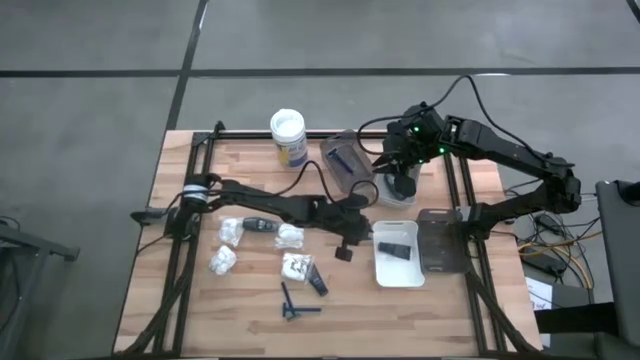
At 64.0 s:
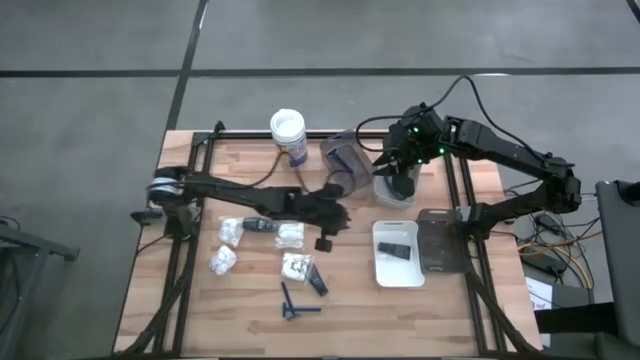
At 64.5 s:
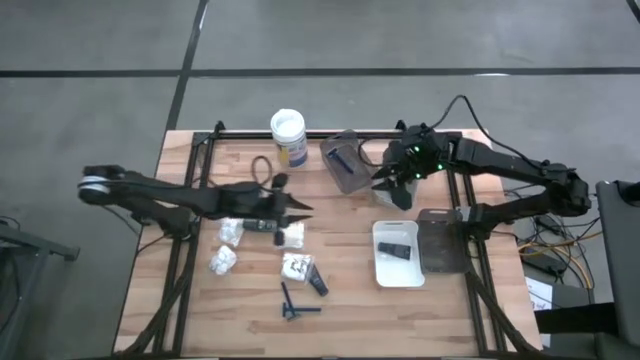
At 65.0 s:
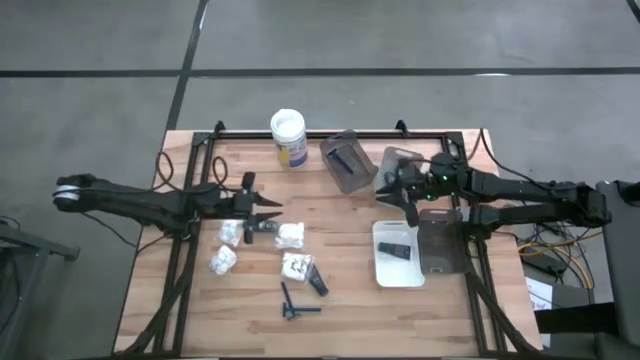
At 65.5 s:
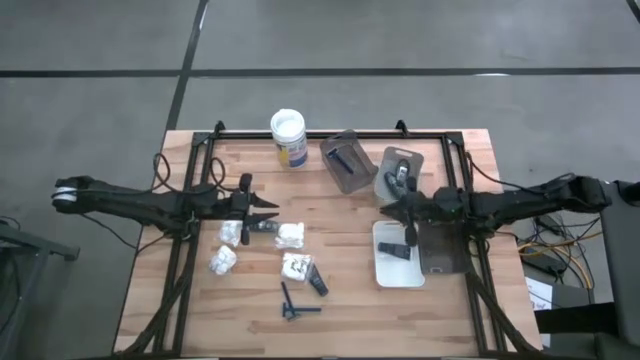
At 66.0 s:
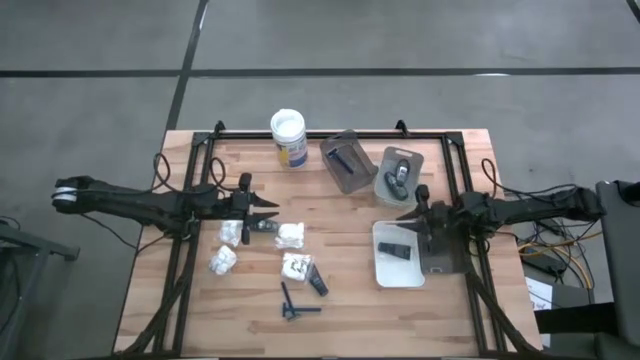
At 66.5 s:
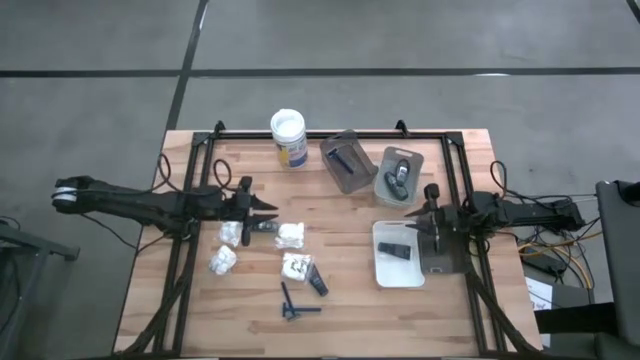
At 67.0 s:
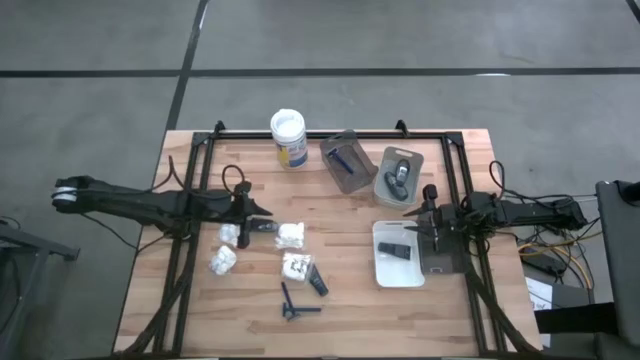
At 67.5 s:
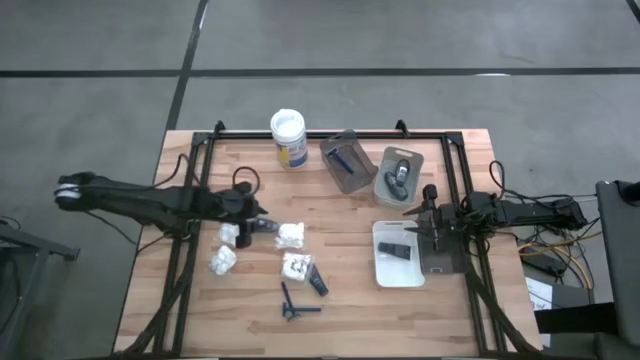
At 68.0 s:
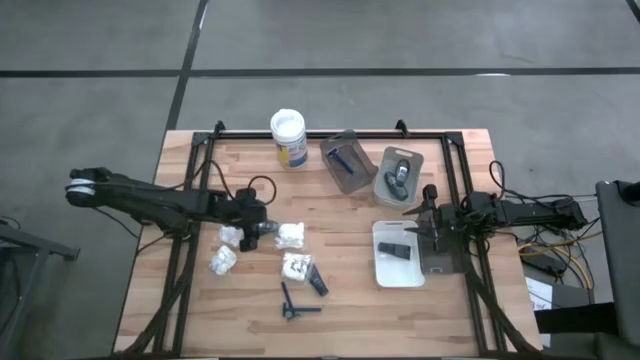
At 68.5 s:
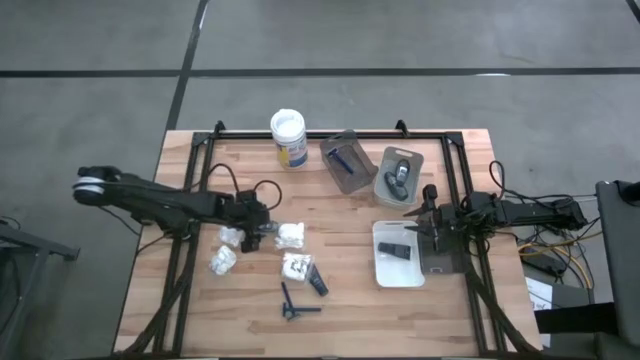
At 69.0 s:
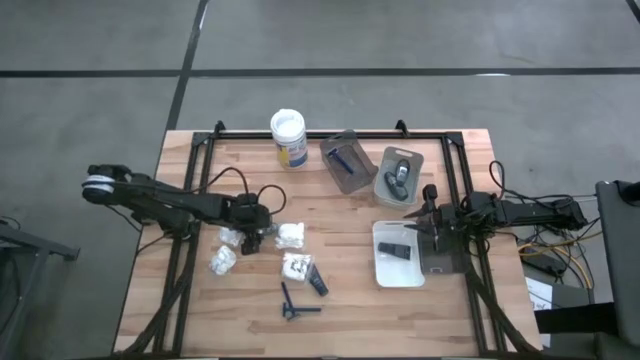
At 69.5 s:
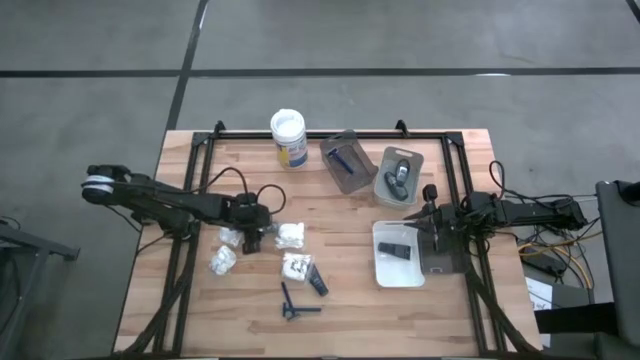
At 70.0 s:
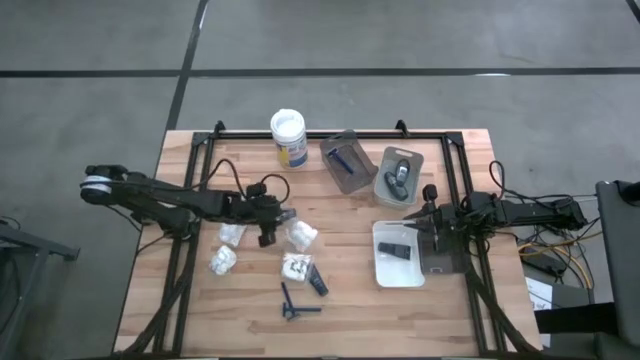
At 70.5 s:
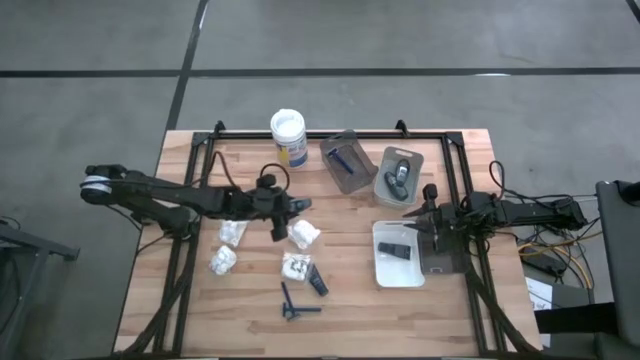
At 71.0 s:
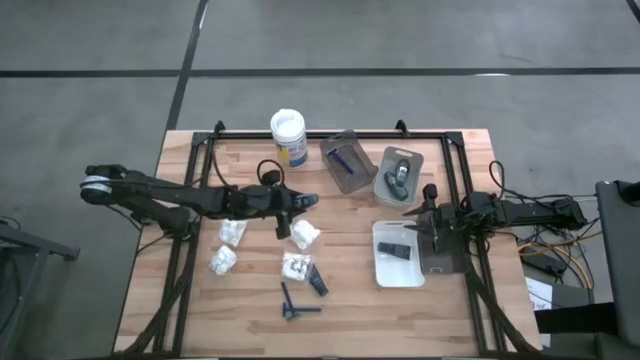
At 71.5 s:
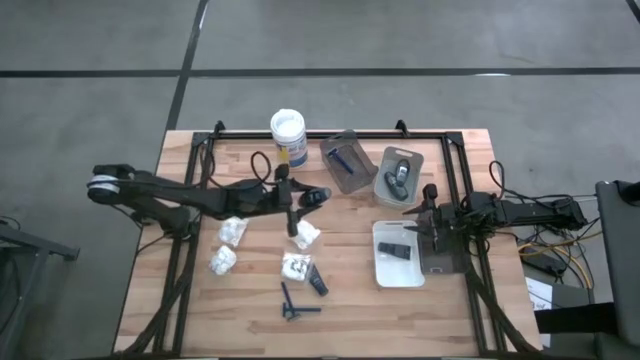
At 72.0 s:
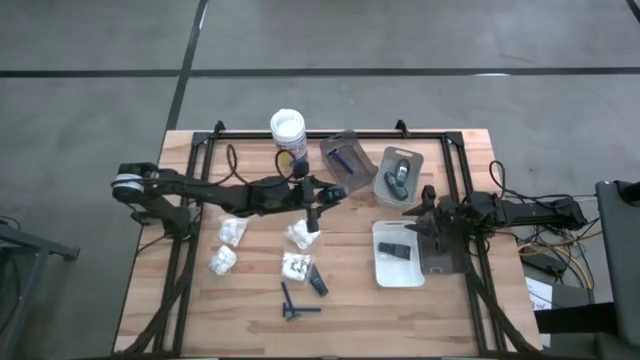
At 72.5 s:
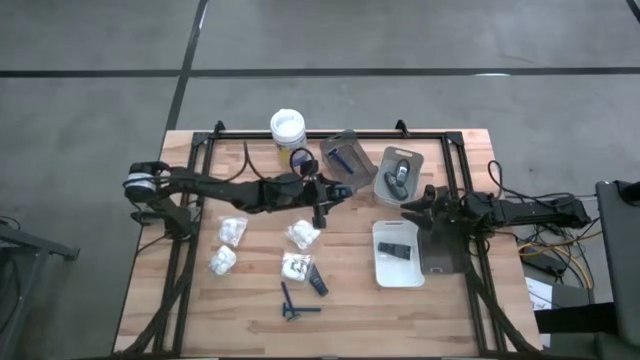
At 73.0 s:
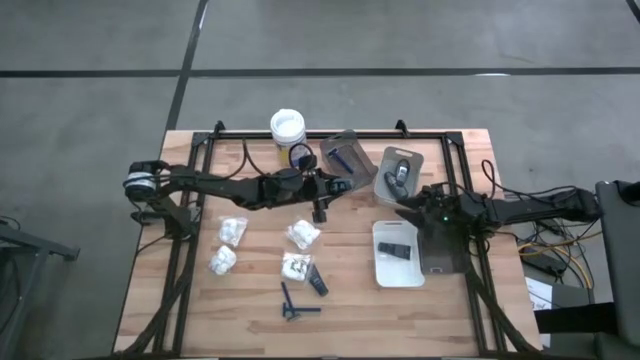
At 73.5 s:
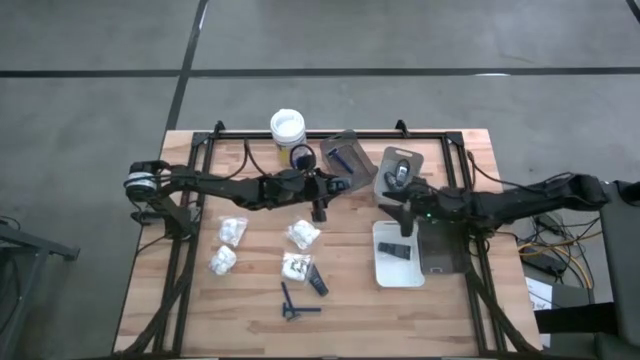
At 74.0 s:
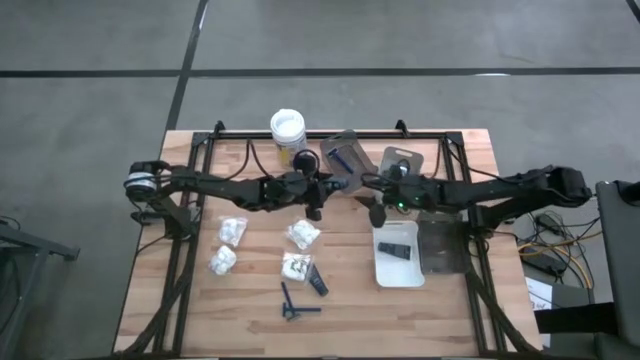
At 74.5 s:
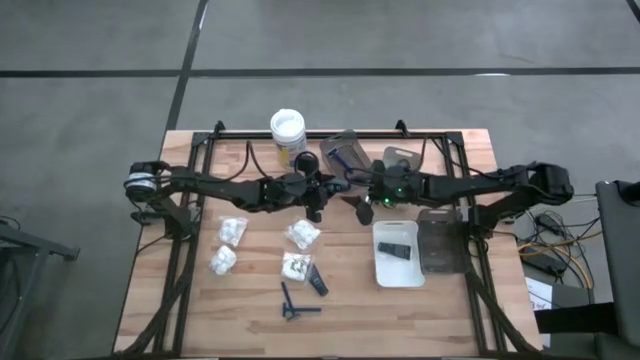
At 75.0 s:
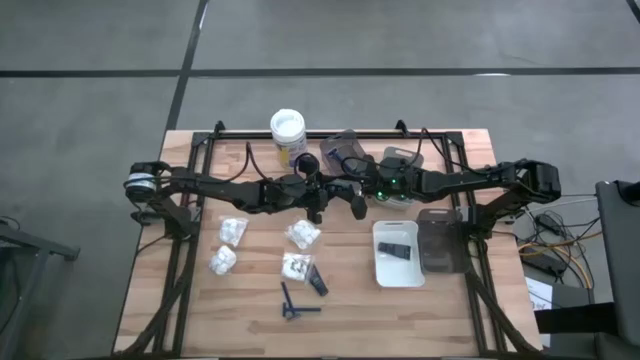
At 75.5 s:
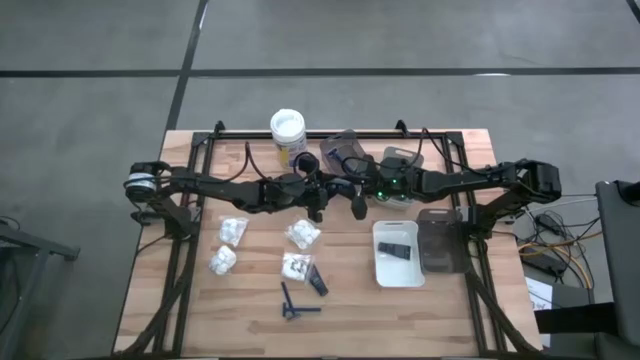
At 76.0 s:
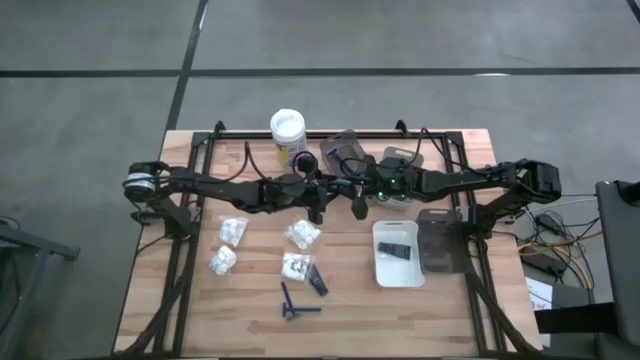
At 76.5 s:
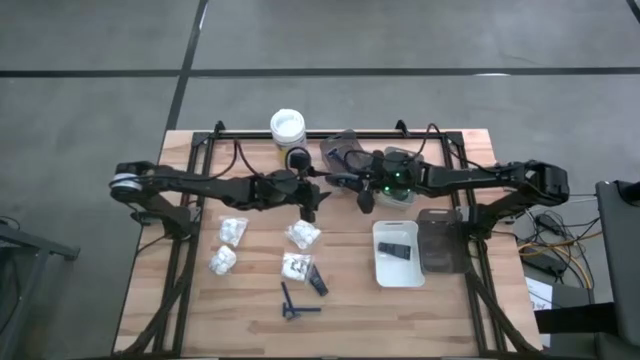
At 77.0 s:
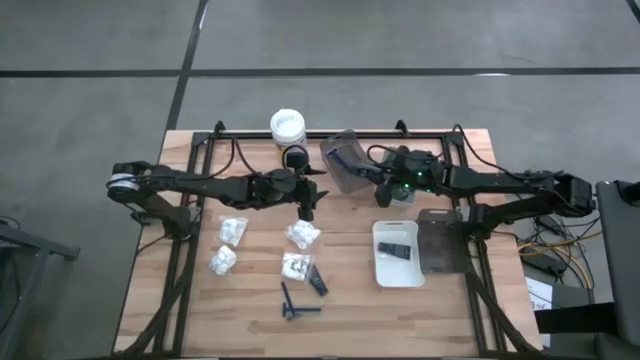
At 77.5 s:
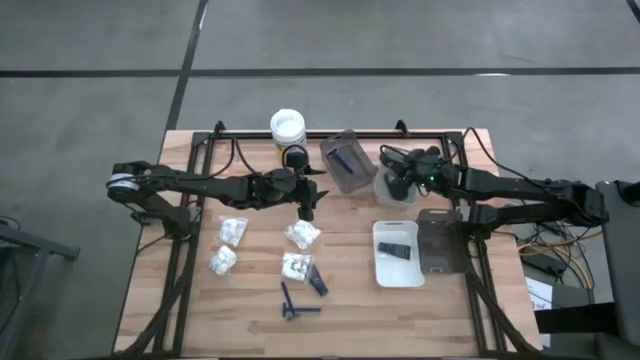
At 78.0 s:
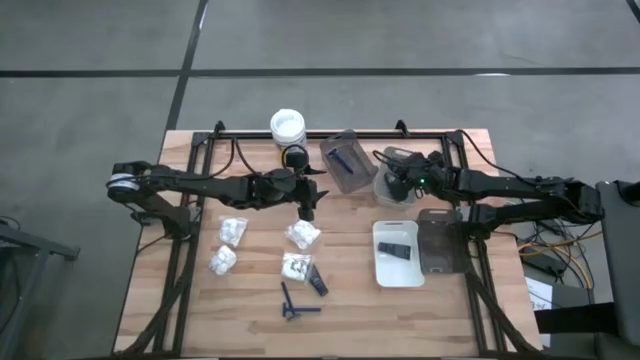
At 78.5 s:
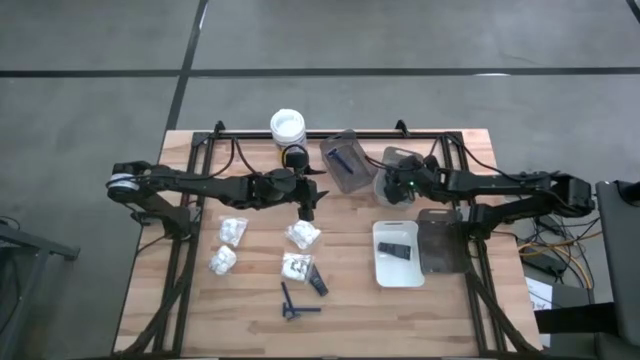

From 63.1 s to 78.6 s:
Task: Pick & Place Travel size toiletries
Put the gray deodorant into the gray bin

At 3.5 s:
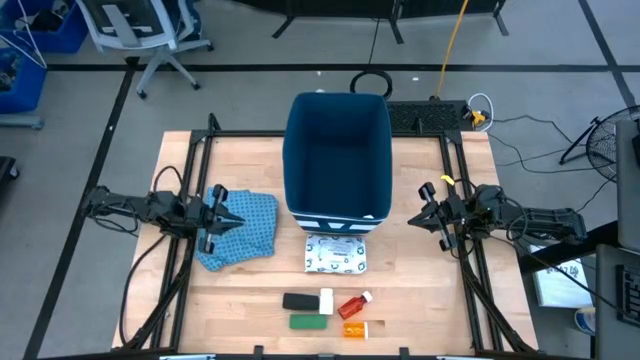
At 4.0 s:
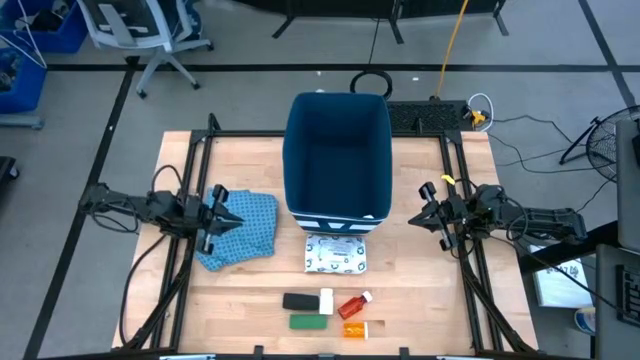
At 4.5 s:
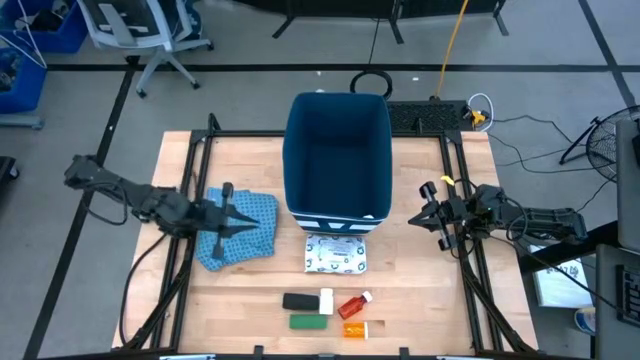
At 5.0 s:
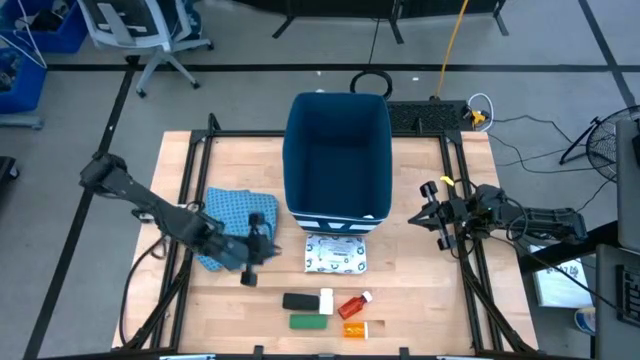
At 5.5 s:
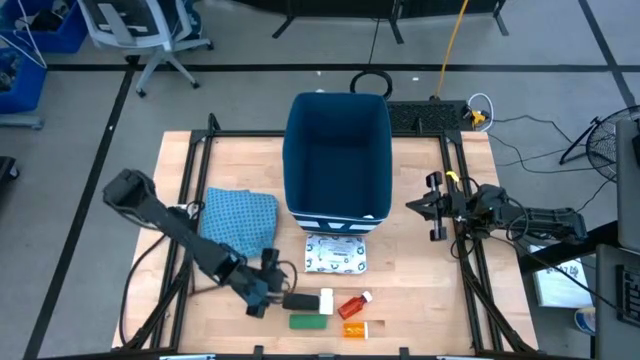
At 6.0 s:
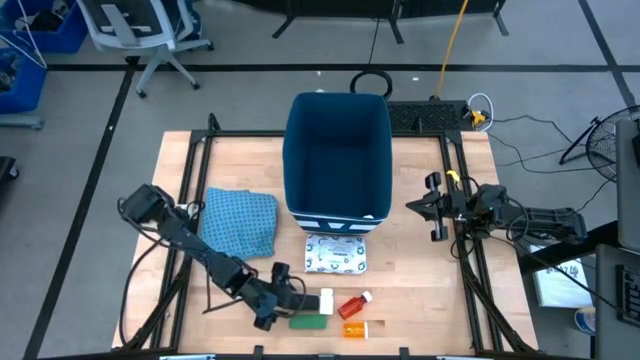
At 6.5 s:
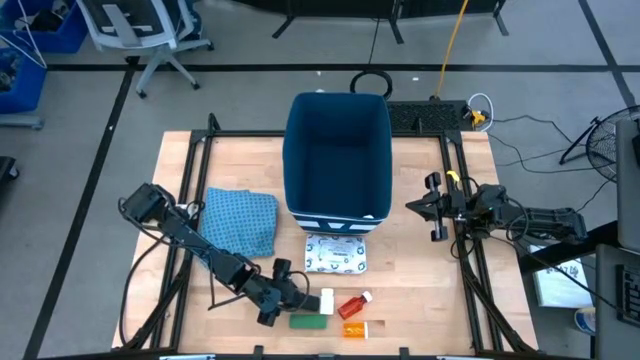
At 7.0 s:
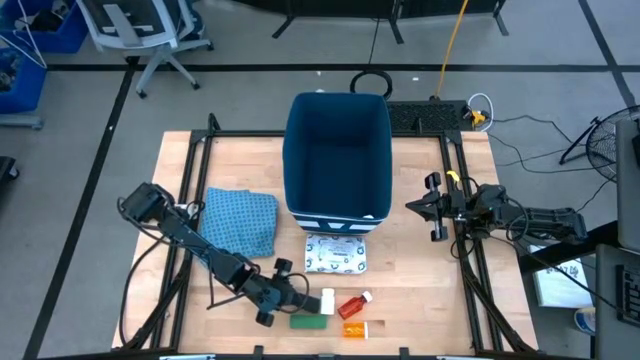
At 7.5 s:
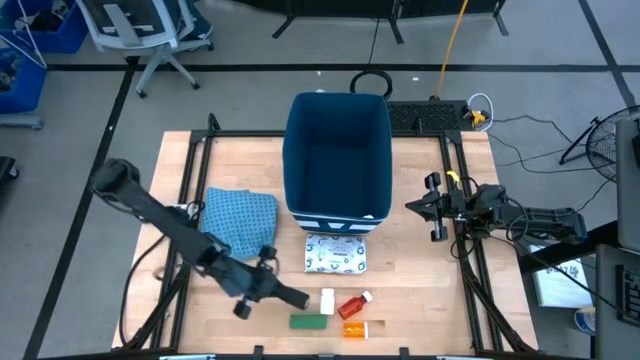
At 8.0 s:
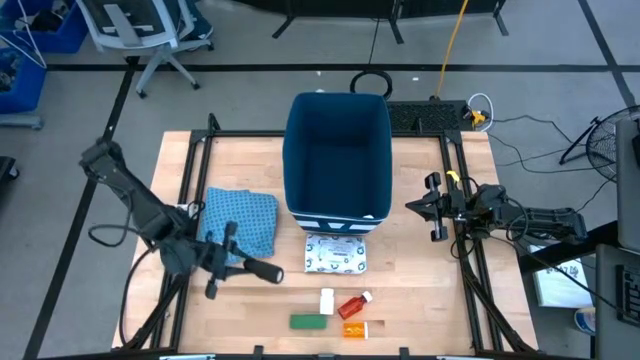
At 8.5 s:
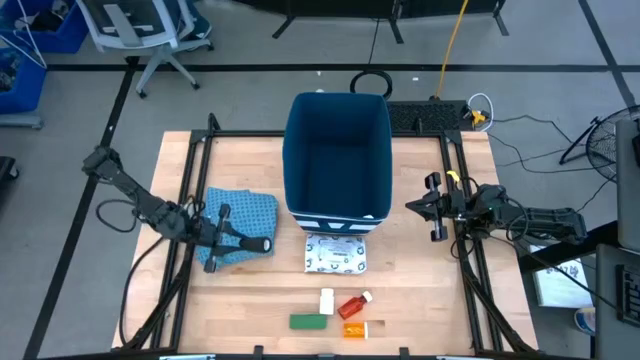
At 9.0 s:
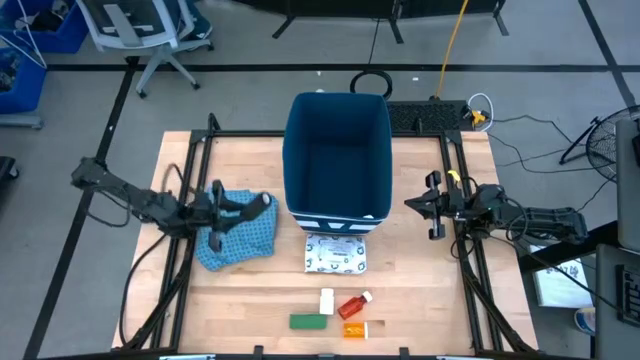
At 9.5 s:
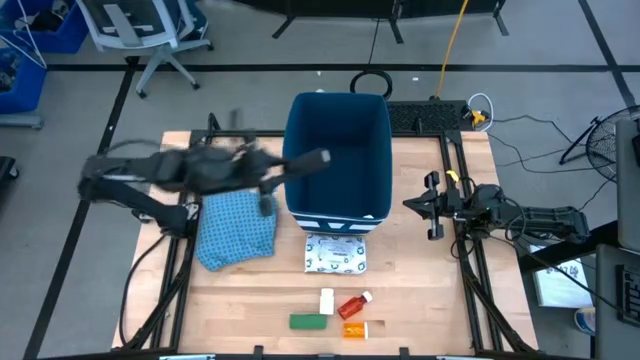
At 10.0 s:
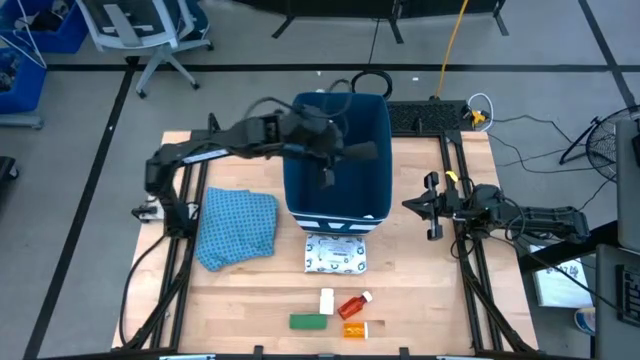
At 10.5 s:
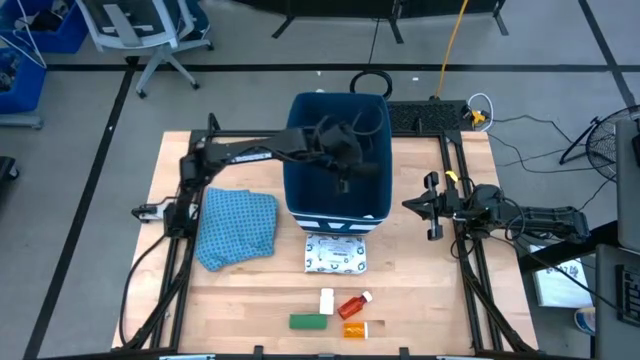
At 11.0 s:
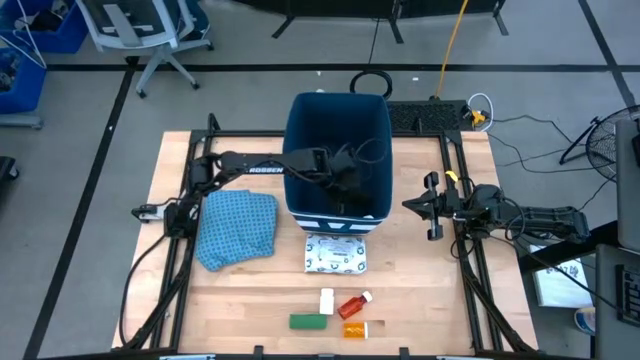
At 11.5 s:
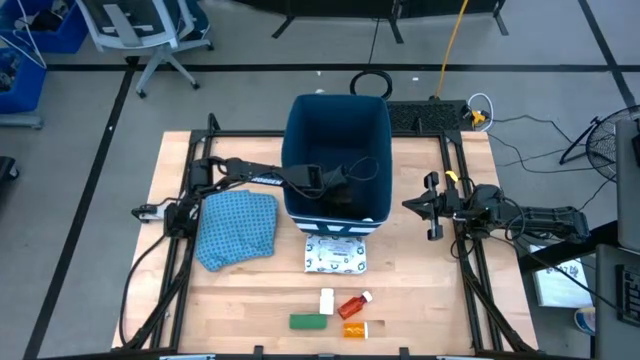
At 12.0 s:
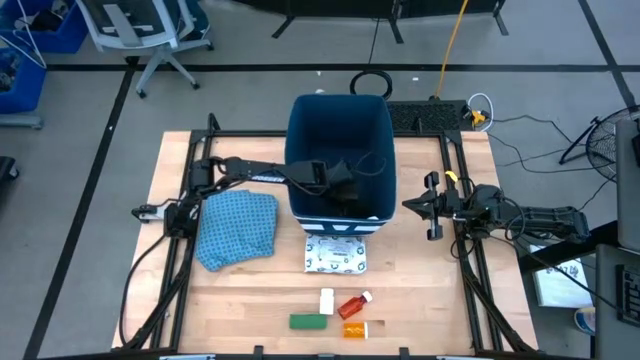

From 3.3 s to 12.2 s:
Task: Pick & place medical supplies in basket/bin
Put the black bandage into the blue bin
